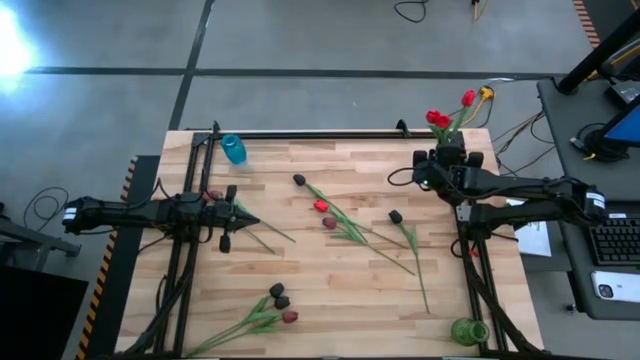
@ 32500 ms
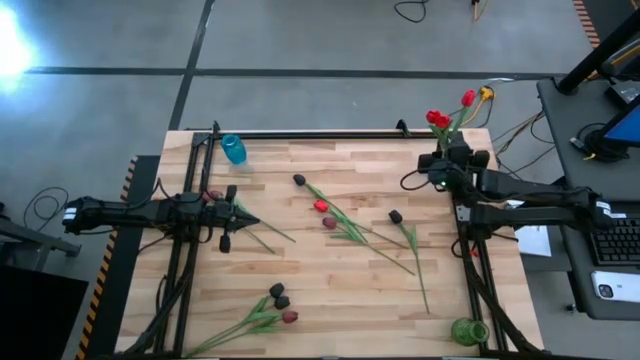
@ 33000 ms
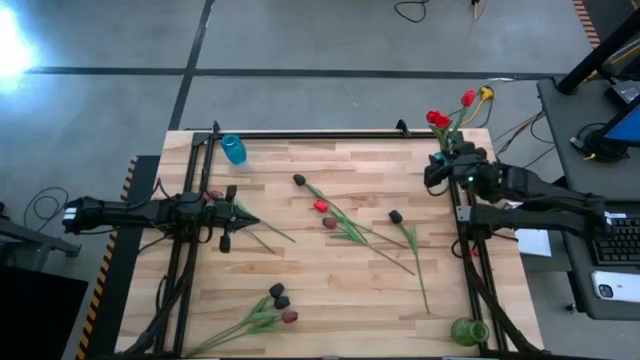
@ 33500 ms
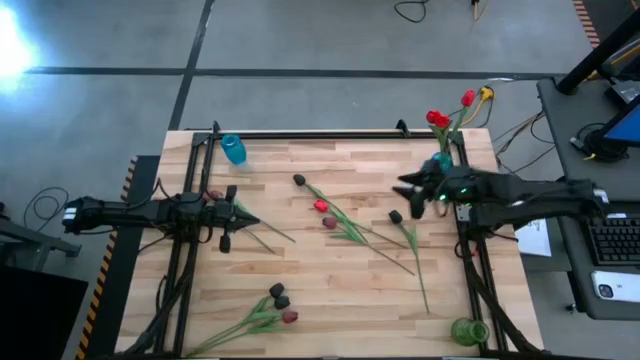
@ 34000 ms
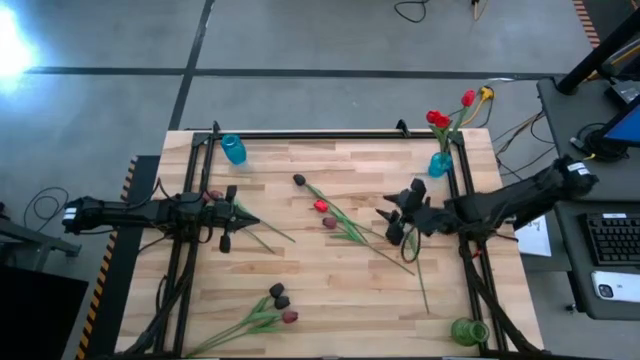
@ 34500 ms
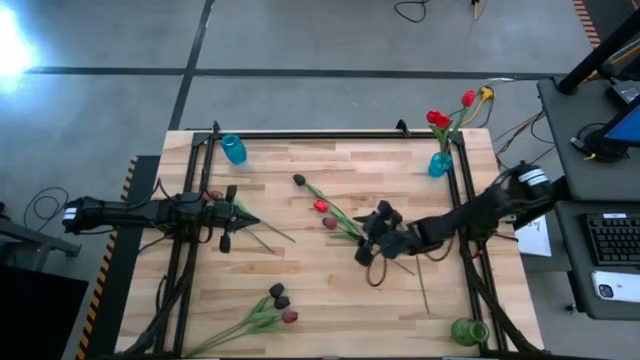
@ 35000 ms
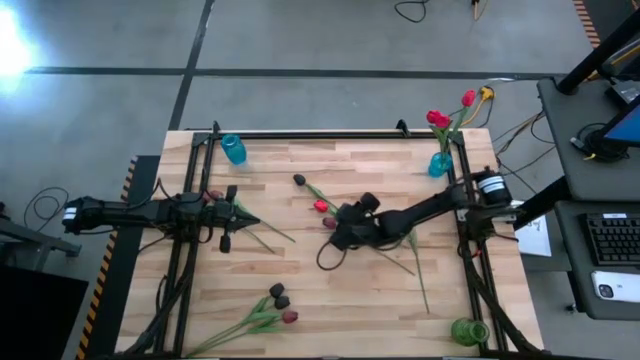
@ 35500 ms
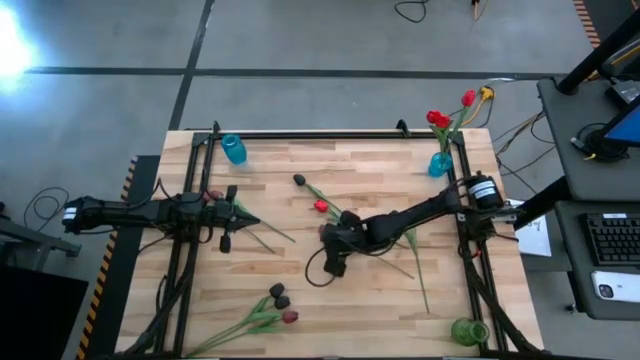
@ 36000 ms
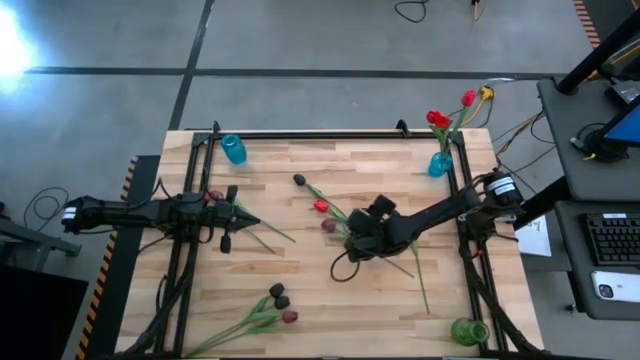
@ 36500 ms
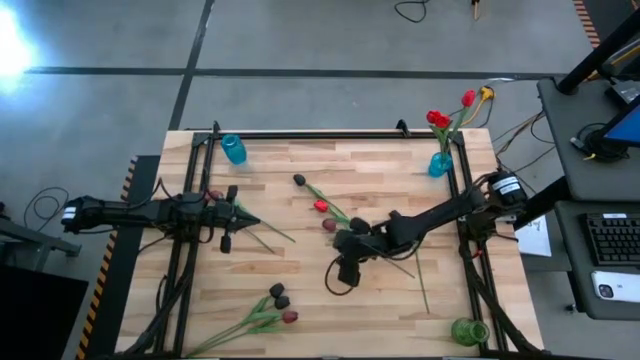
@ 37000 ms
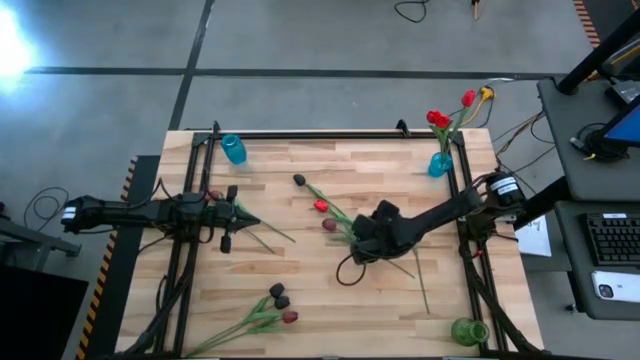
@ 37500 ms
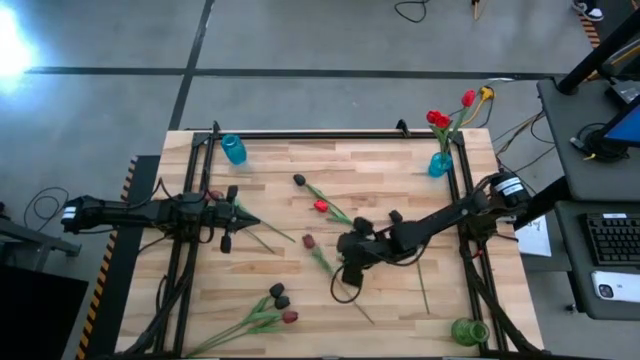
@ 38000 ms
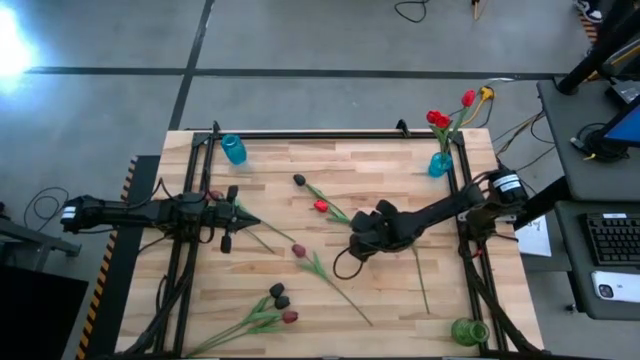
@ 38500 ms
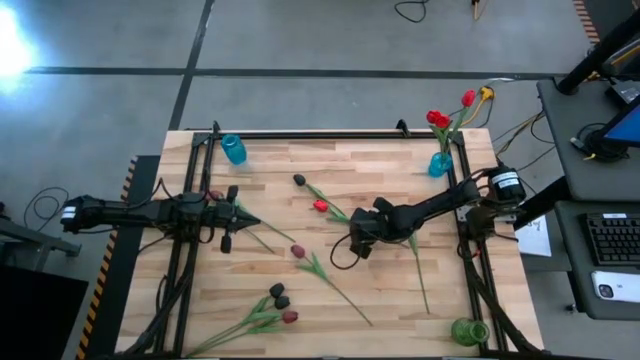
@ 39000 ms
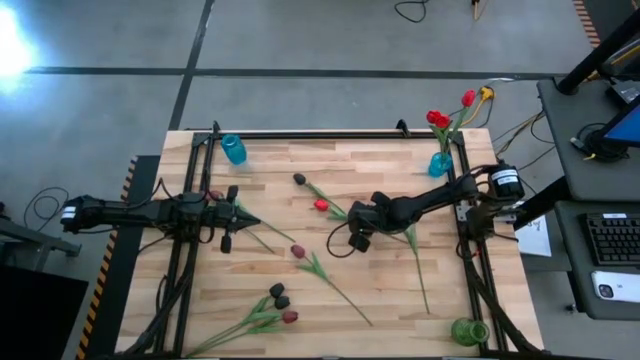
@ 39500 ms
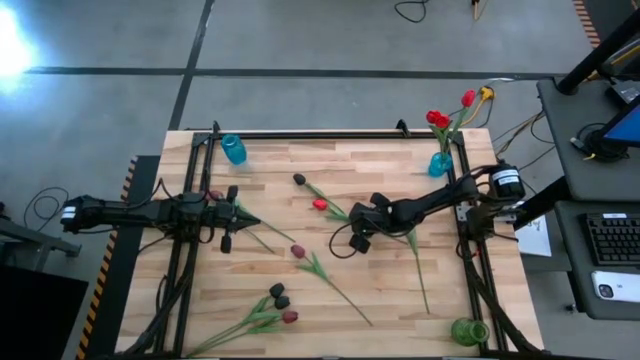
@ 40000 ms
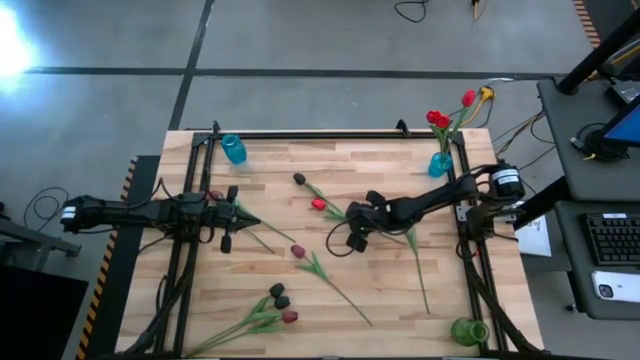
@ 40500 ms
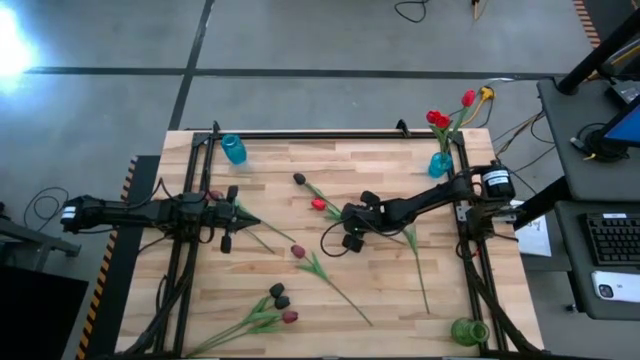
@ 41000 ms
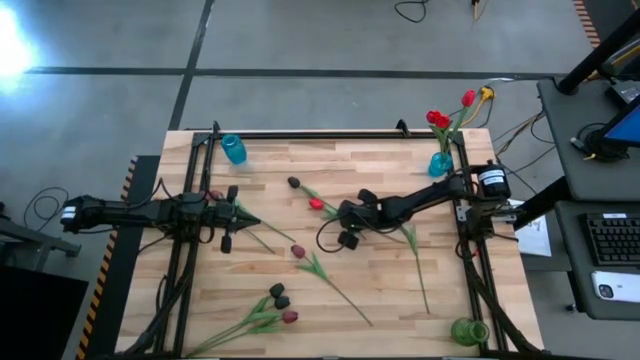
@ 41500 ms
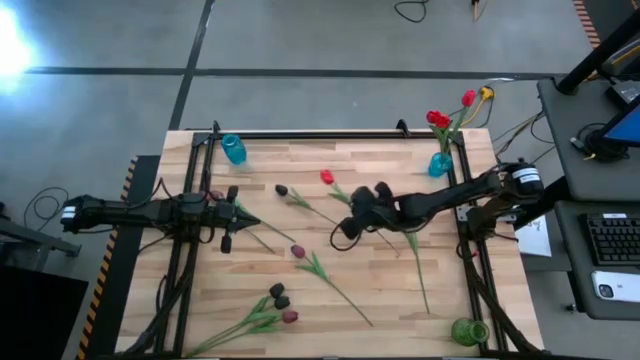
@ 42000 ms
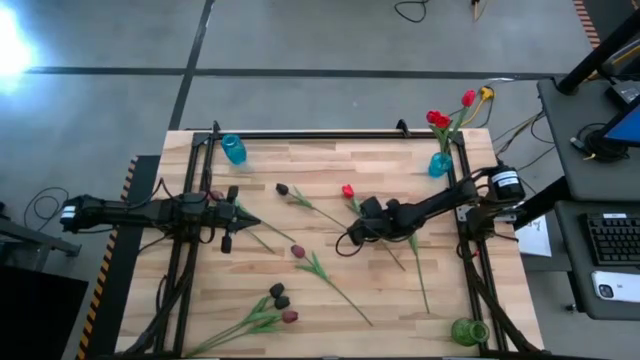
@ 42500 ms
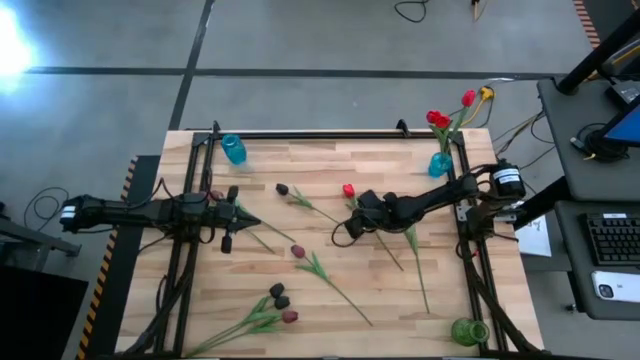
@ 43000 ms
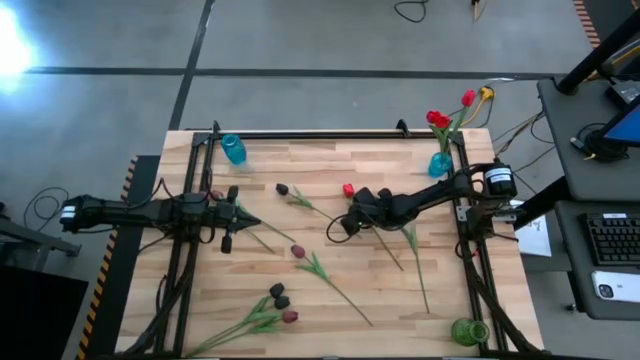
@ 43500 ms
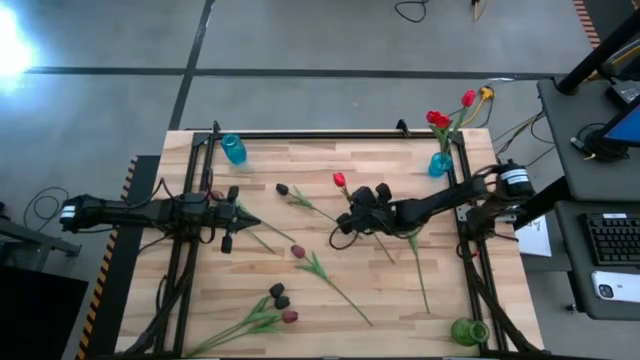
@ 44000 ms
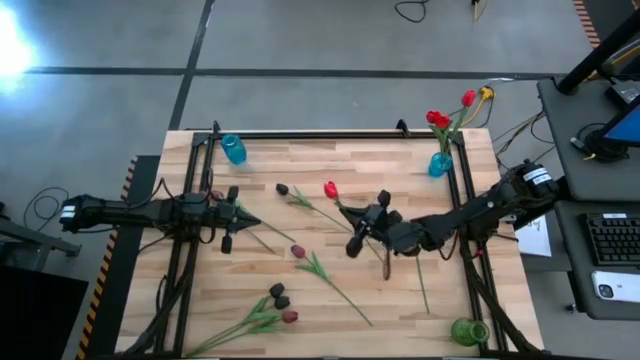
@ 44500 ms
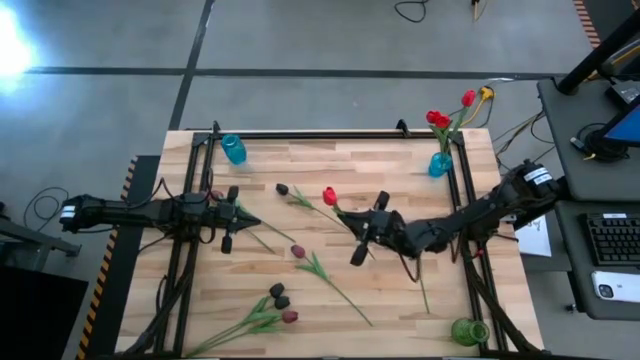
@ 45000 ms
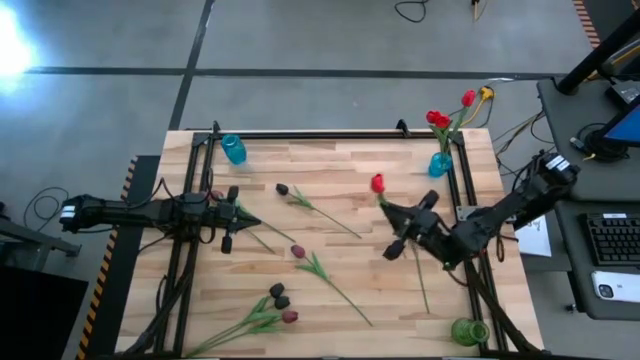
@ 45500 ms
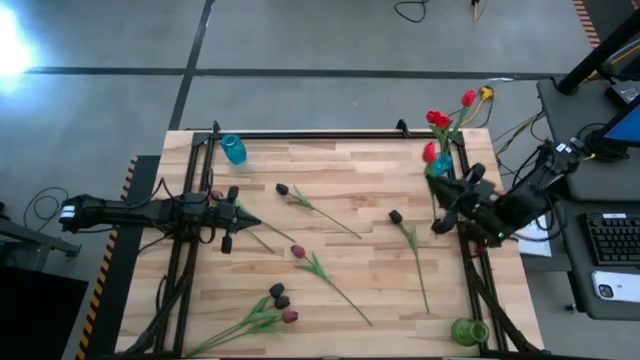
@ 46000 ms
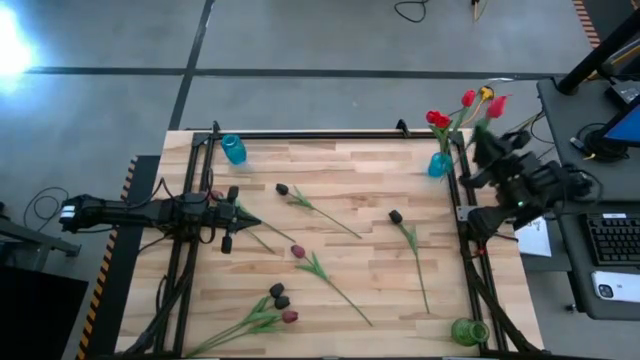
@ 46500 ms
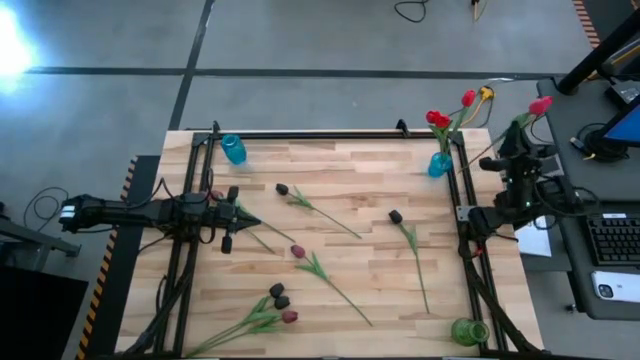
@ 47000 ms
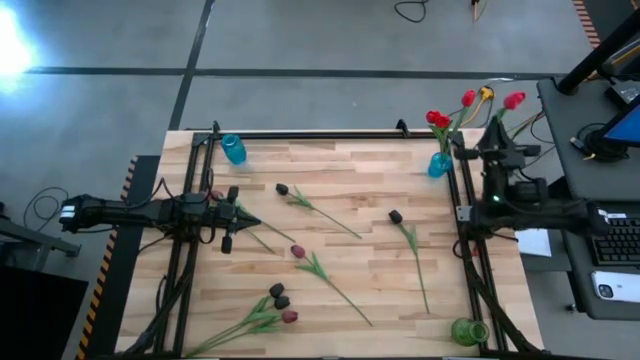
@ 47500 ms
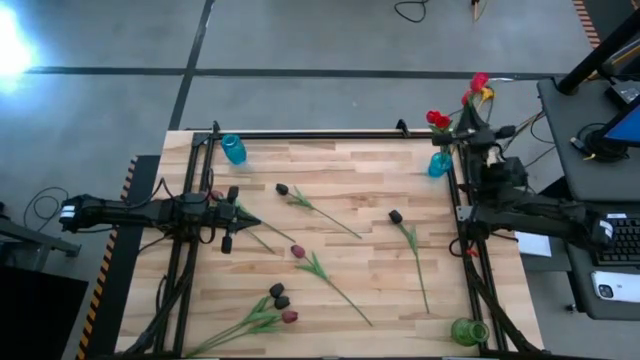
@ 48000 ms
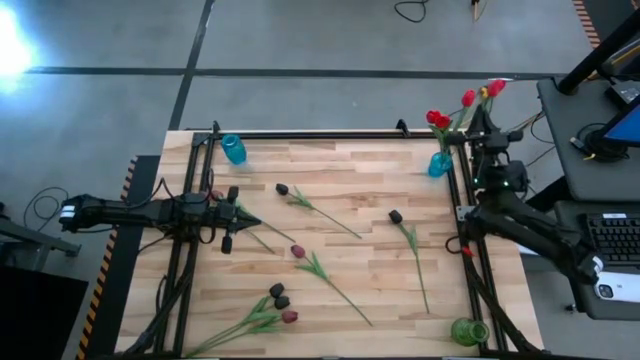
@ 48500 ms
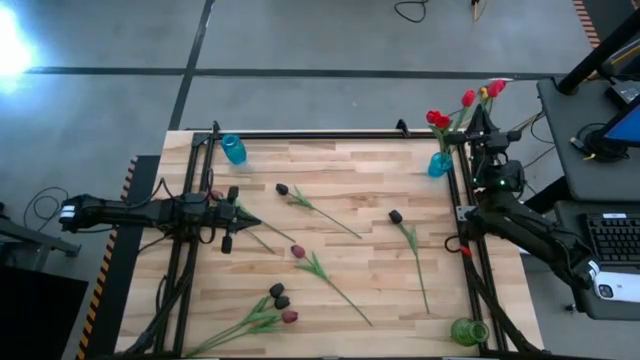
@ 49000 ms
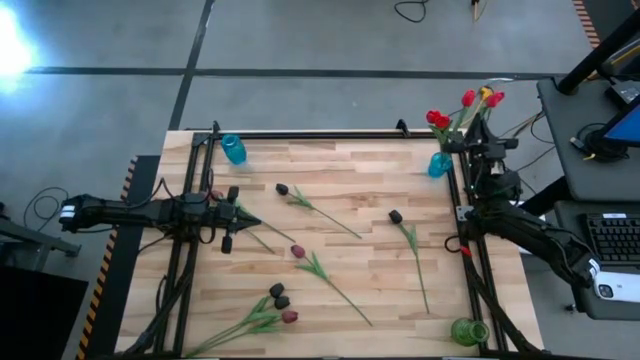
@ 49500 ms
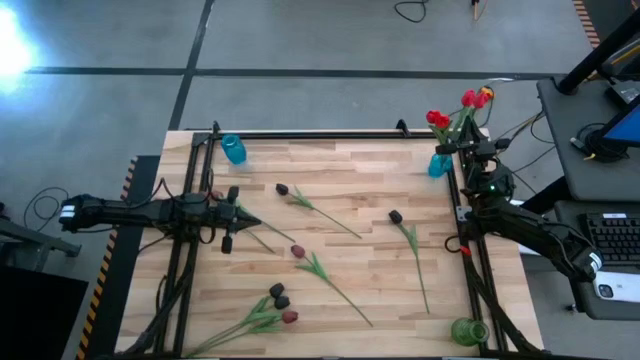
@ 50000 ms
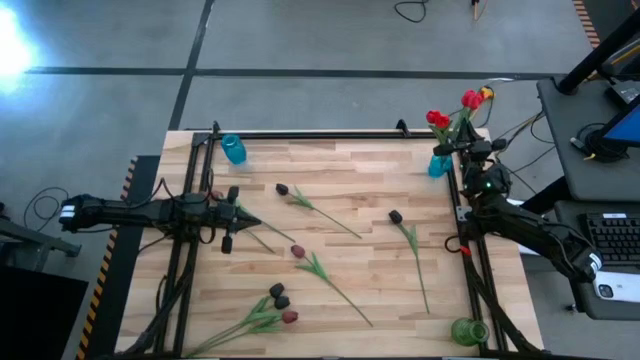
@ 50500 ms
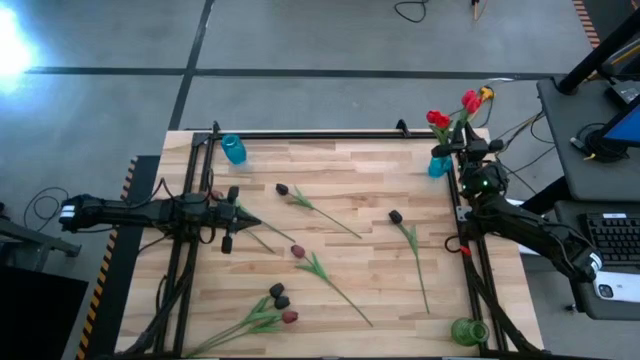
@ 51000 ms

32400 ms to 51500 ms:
Task: Sort flowers into vase by color
Put the red tulip into the right blue vase

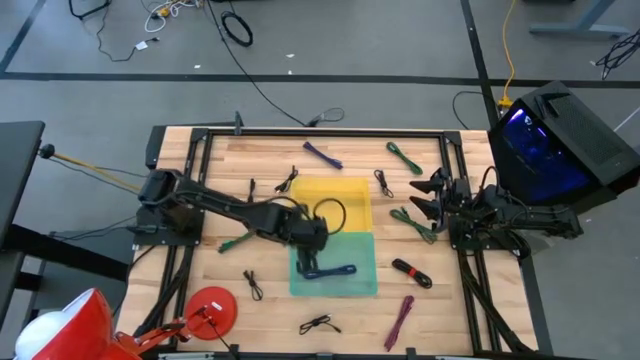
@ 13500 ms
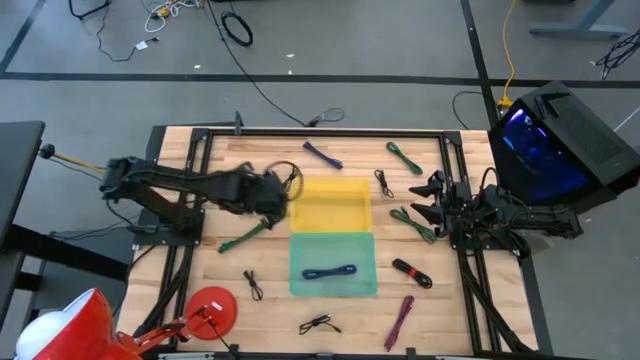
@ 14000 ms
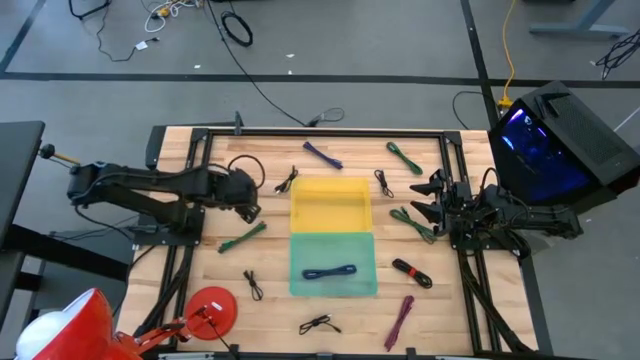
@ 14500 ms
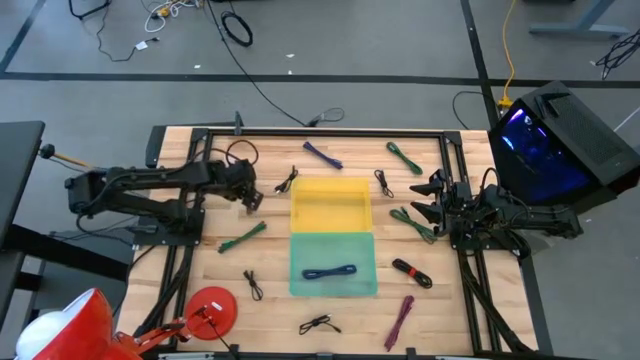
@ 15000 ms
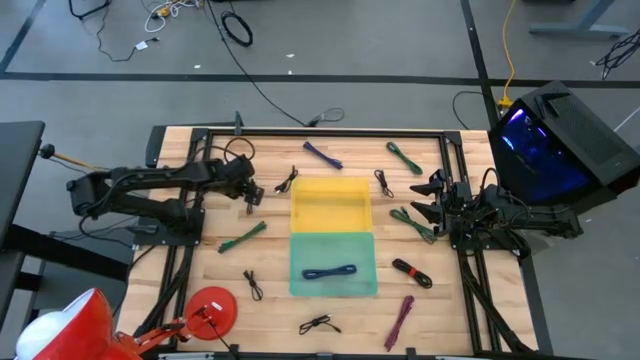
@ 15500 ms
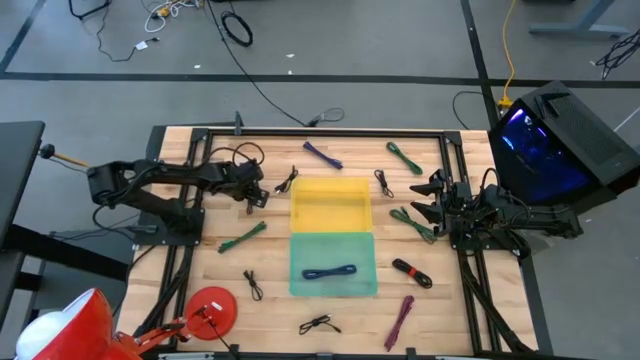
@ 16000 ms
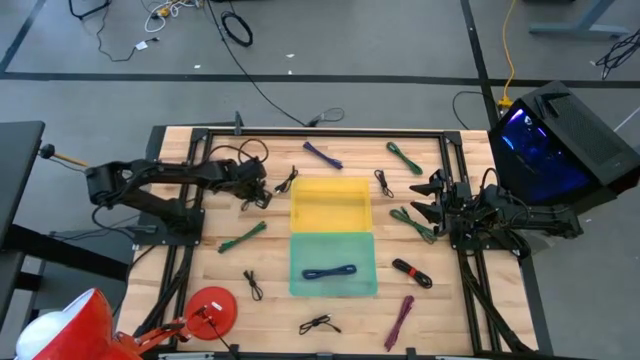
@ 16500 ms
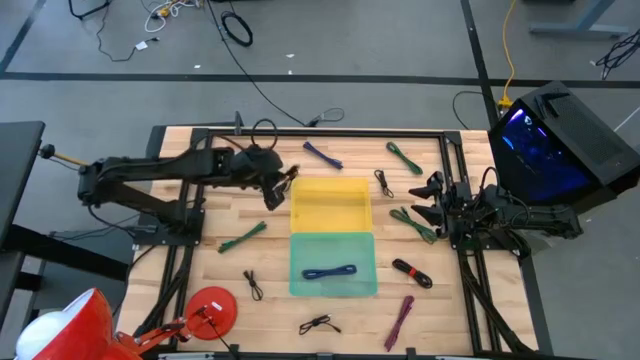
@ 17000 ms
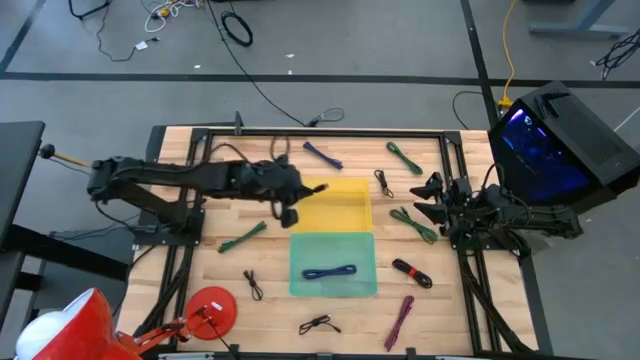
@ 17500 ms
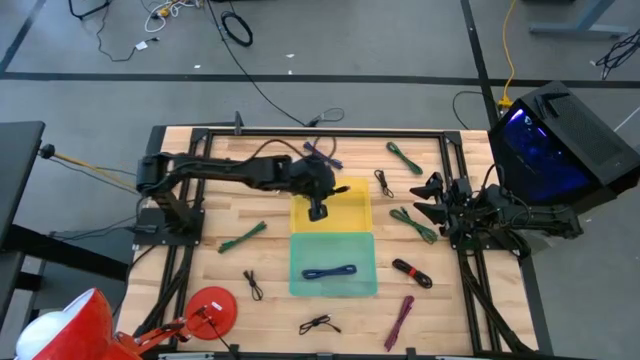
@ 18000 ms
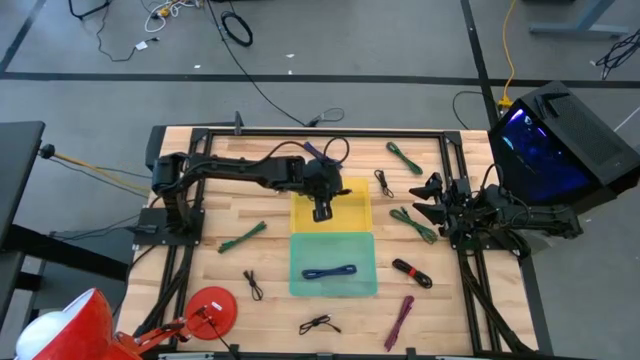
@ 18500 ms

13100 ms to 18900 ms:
Task: Pick & Place USB Port
Put the black charger cable into the yellow bin
